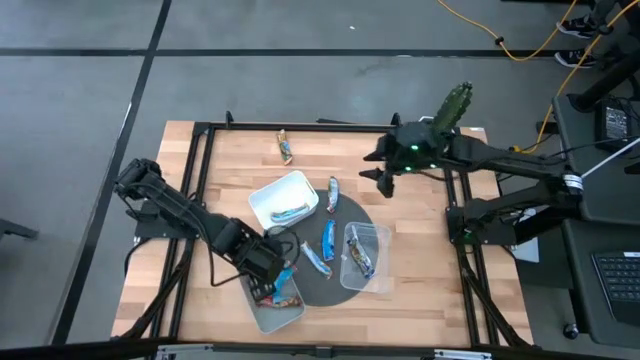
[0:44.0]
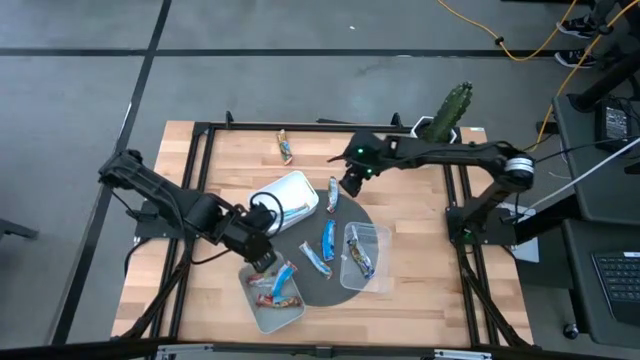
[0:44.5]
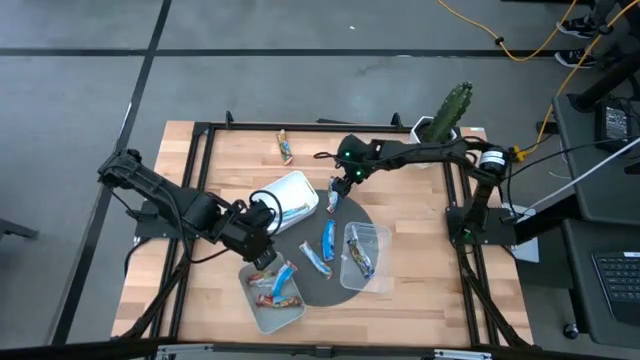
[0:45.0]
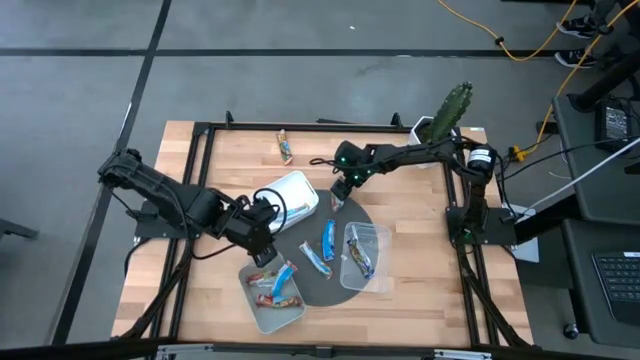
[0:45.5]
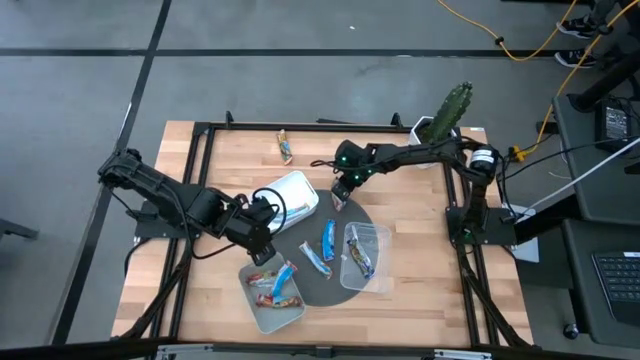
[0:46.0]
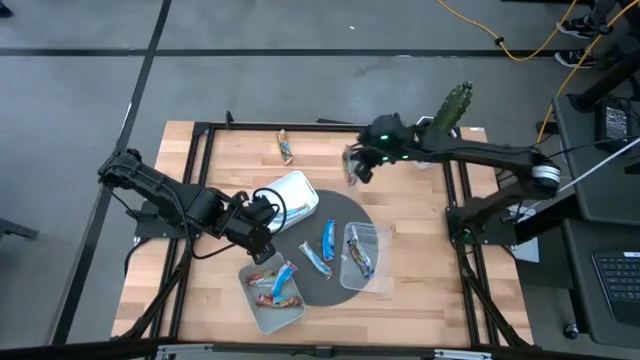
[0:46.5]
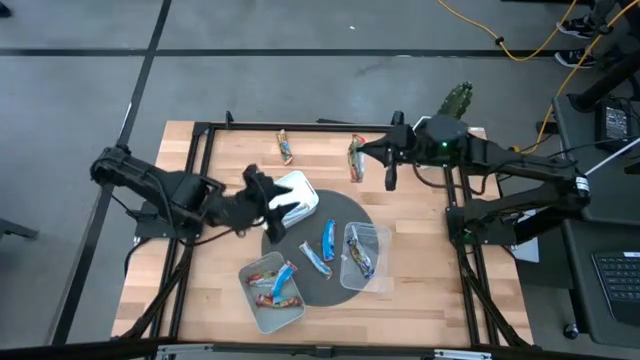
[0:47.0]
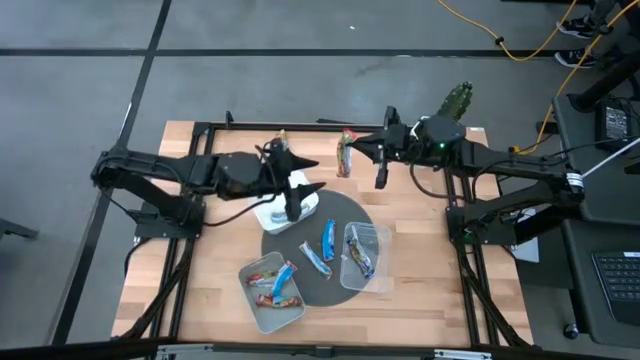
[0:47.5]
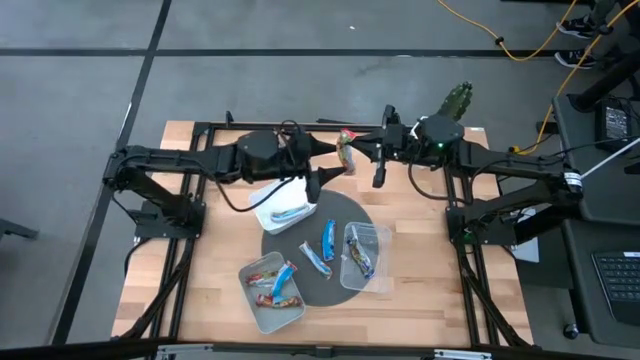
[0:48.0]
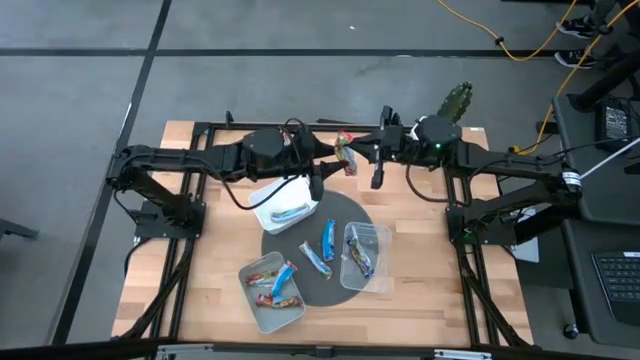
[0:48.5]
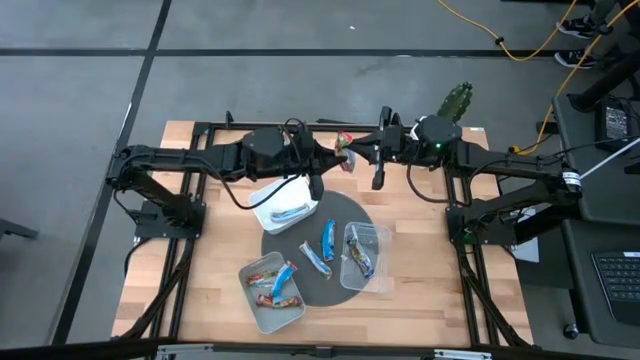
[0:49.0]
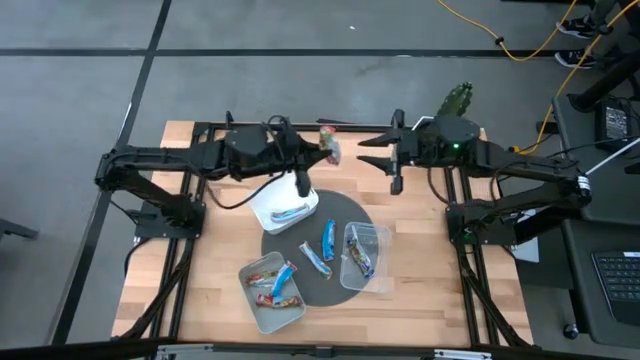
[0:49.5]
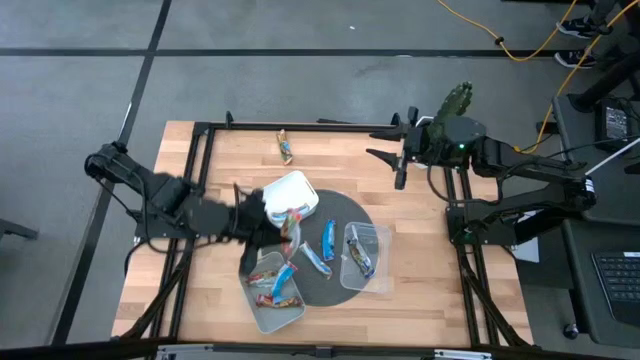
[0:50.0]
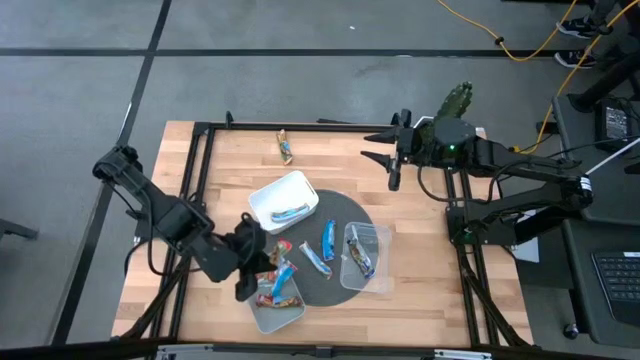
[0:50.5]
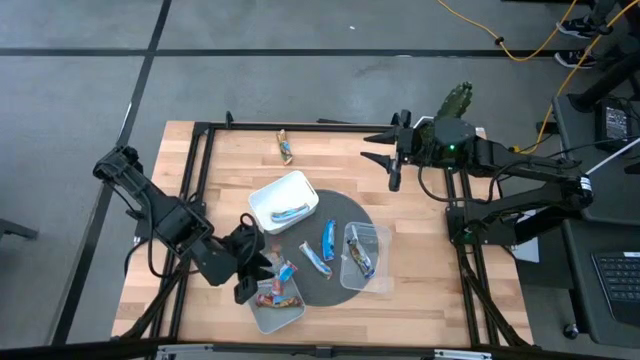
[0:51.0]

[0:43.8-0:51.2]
Task: Pick and place Granola Bars by type
Put the red granola bar into the gray bin

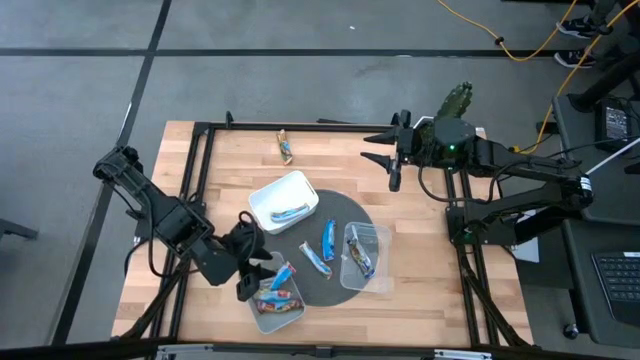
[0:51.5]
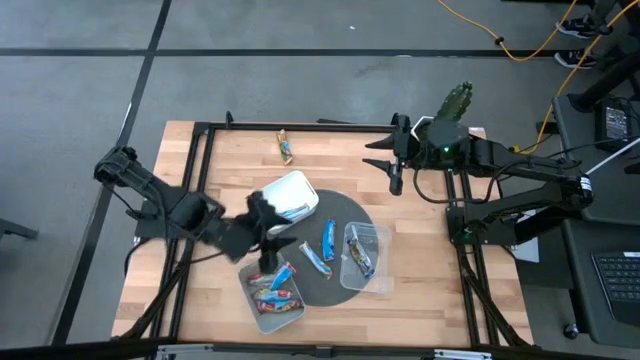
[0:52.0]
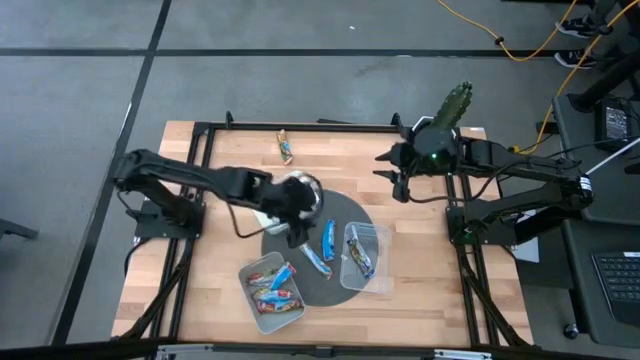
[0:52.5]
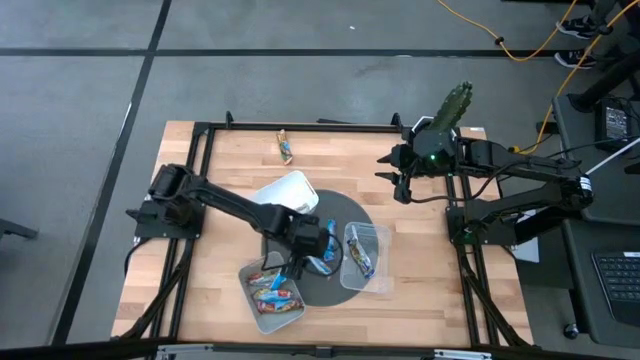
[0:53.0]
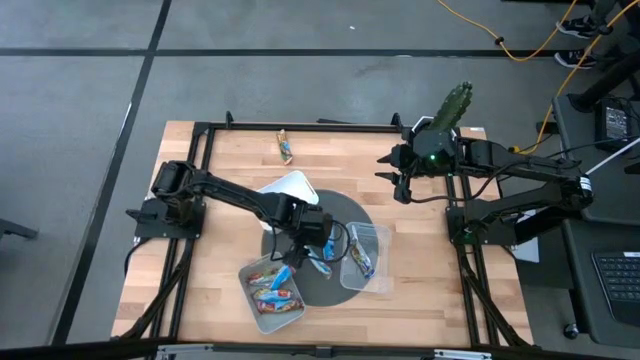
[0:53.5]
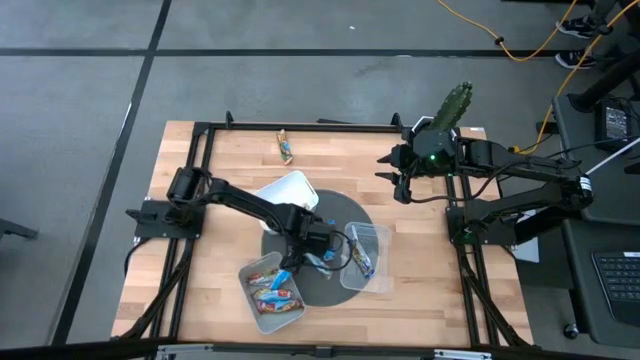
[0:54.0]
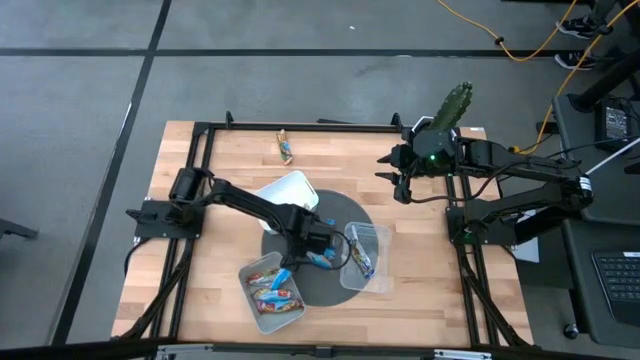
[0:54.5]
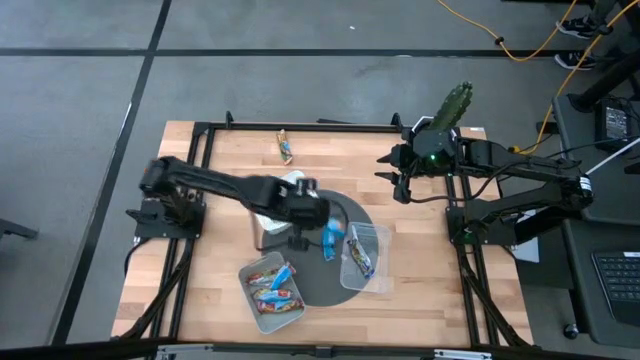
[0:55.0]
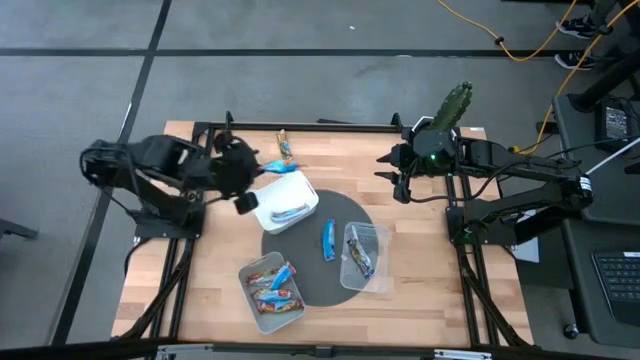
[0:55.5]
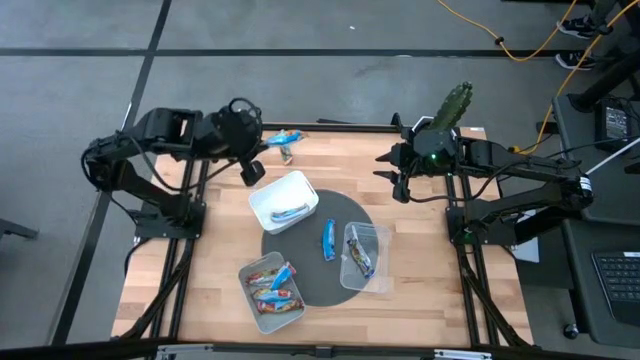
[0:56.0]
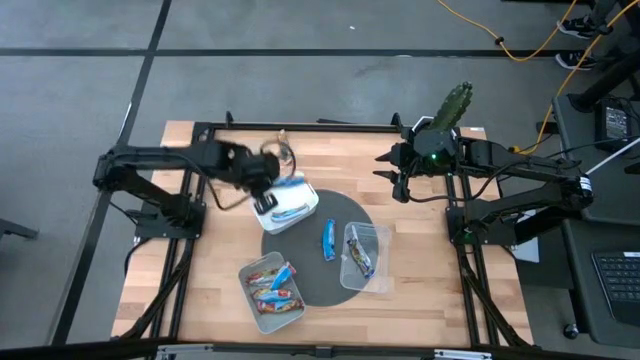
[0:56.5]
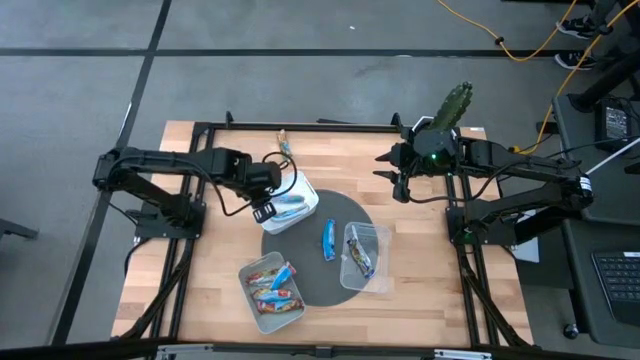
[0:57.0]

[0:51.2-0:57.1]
Put the orange granola bar into the white bin

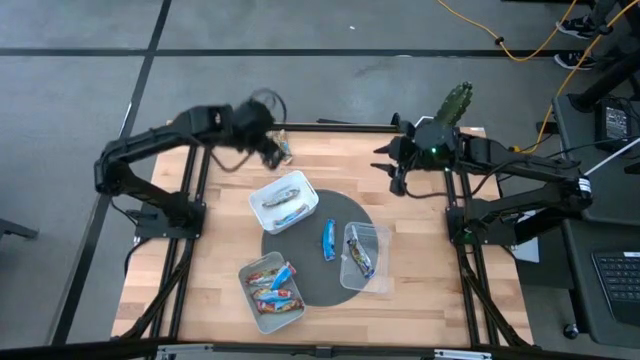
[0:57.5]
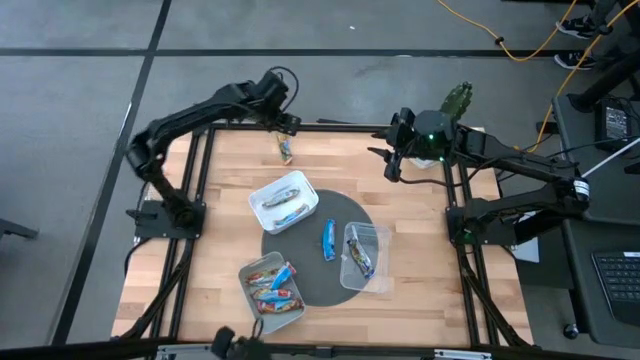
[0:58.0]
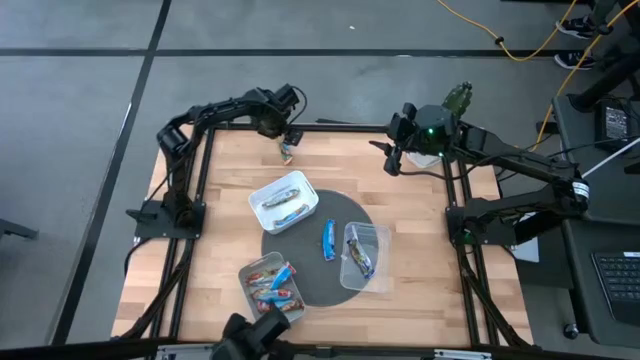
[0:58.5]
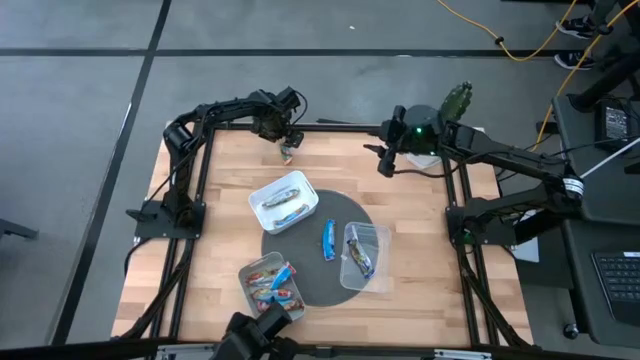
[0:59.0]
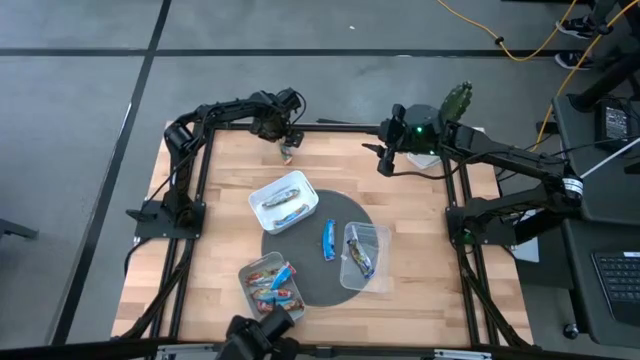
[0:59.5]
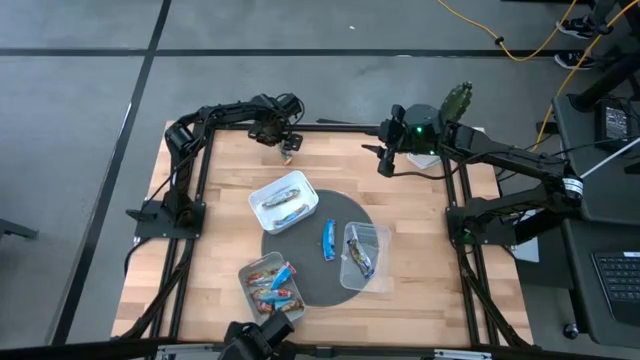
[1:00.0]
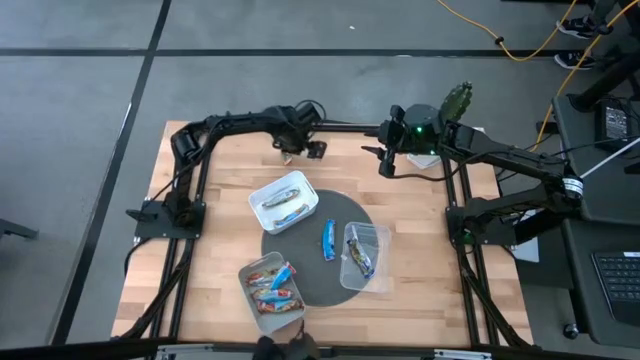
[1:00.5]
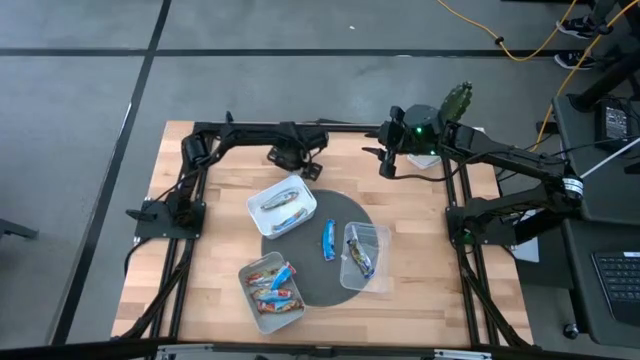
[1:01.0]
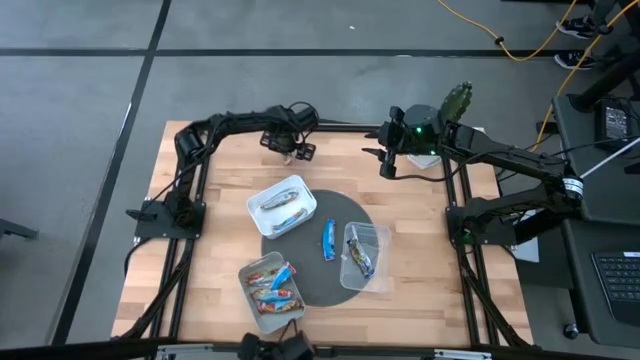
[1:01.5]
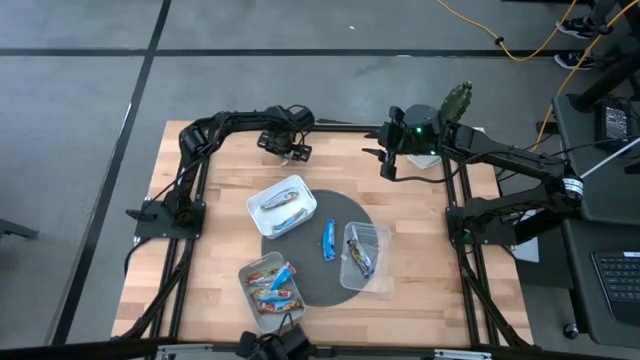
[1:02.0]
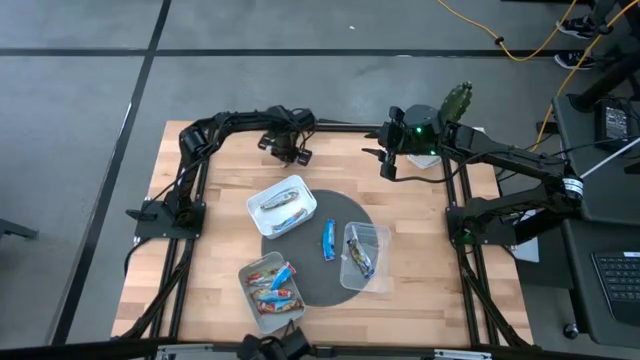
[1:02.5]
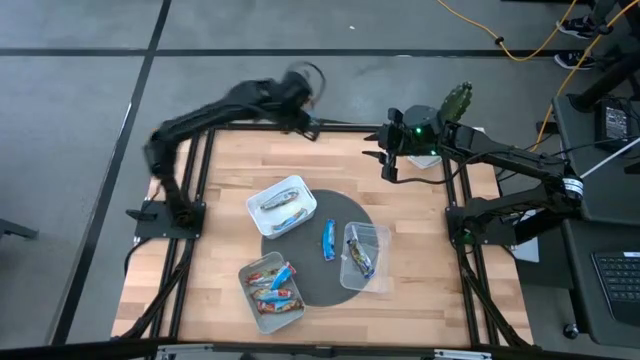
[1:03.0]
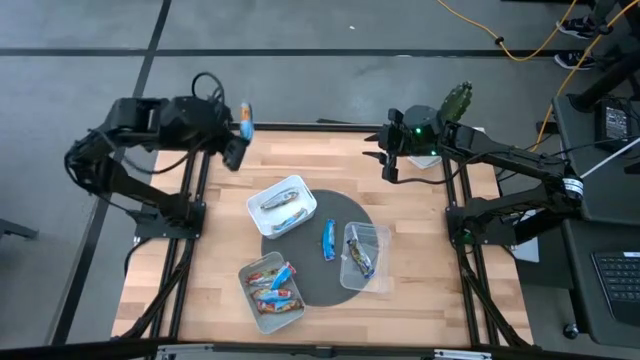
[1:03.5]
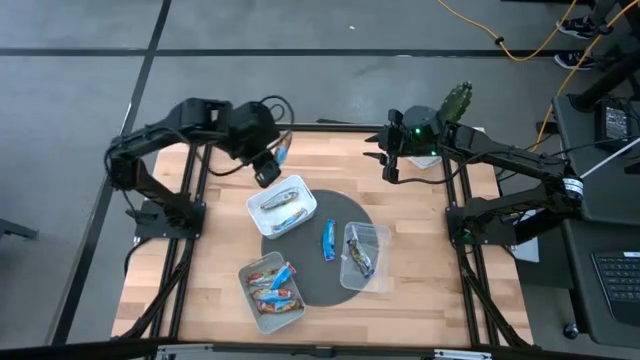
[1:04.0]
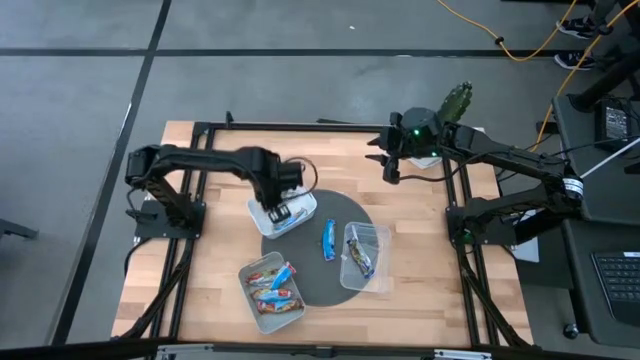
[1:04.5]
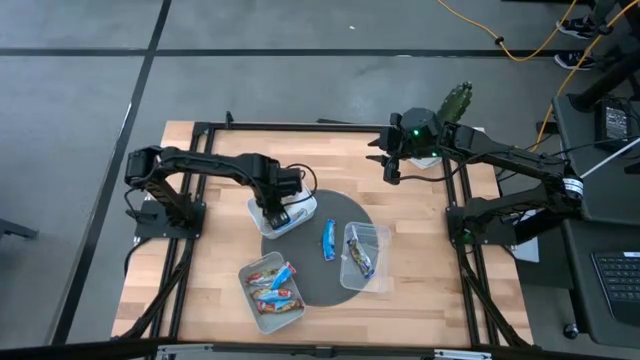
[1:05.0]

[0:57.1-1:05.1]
Put the orange granola bar into the white bin

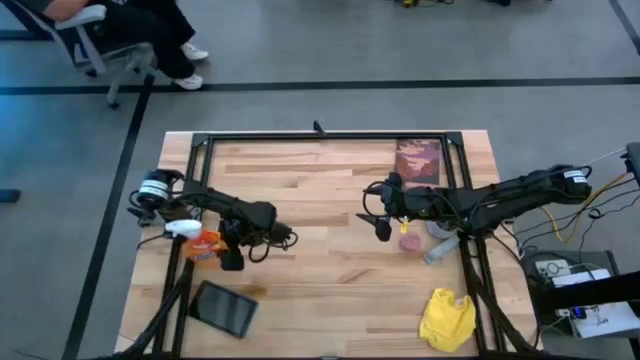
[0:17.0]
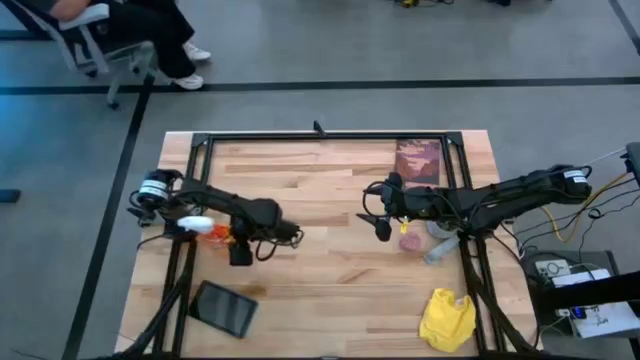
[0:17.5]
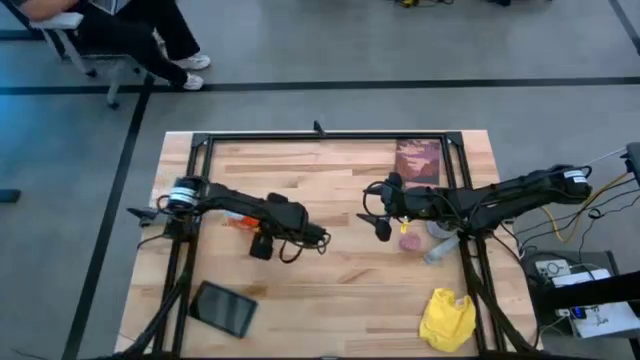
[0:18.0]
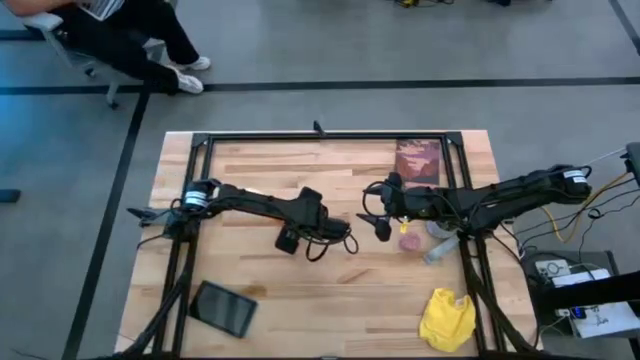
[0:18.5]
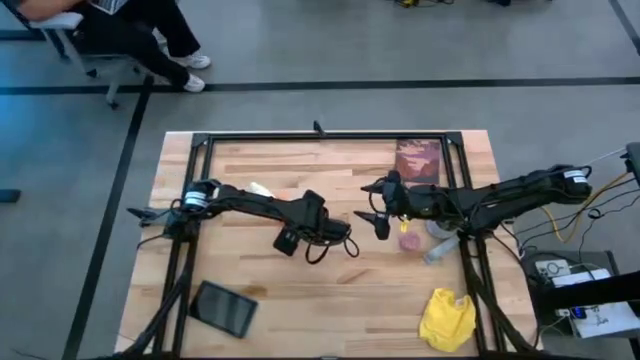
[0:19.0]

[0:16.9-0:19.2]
Task: Apply microfiber cloth
Move the spray cleaning bottle to the center
